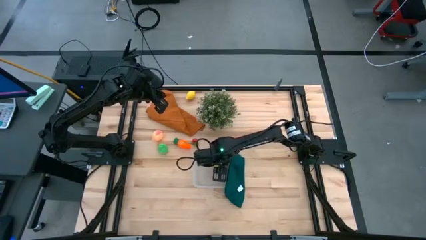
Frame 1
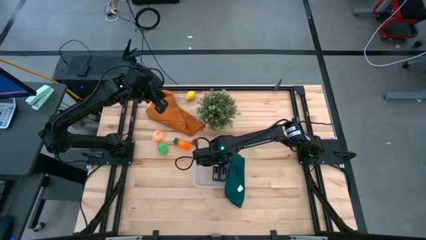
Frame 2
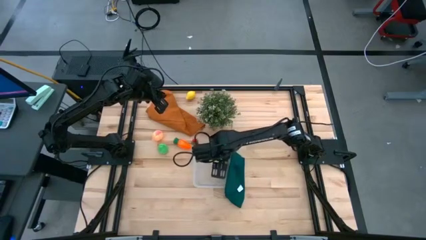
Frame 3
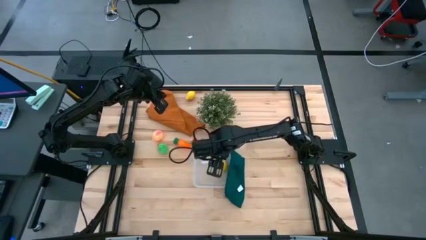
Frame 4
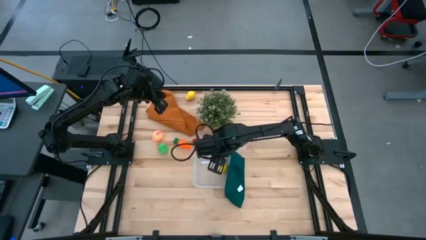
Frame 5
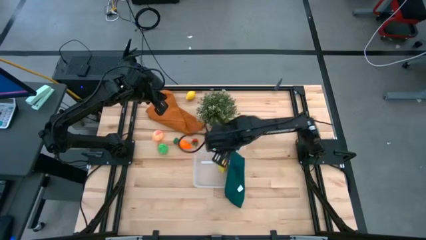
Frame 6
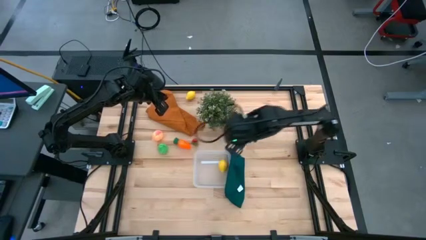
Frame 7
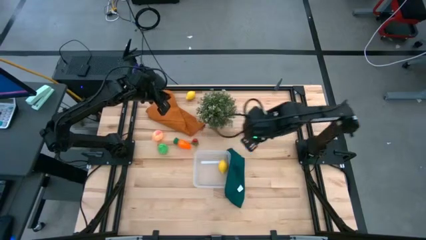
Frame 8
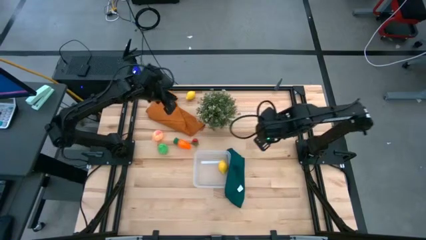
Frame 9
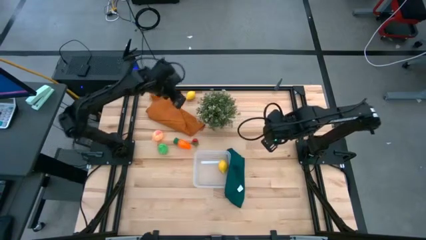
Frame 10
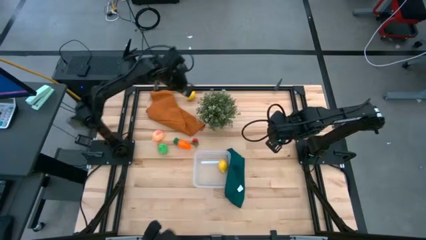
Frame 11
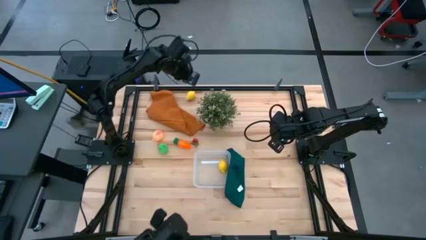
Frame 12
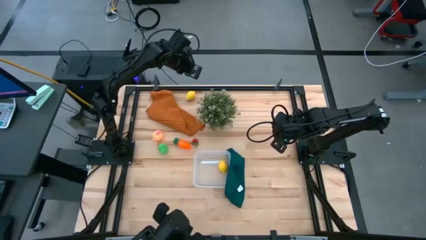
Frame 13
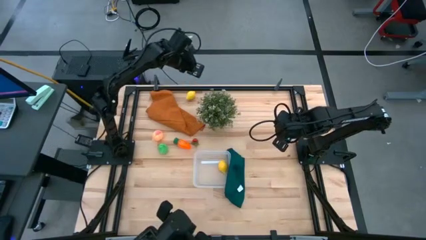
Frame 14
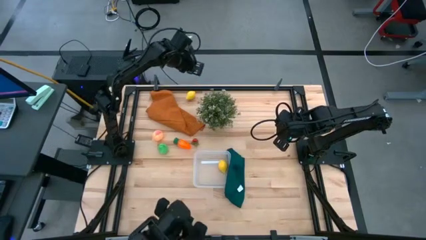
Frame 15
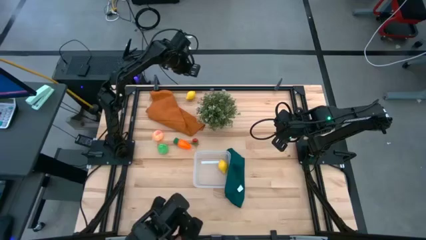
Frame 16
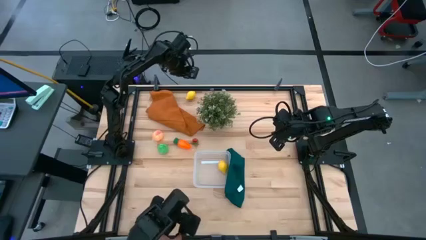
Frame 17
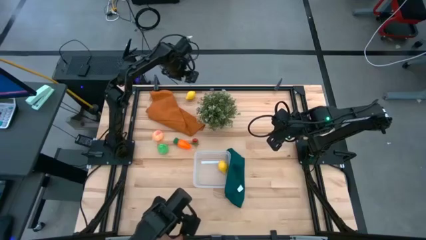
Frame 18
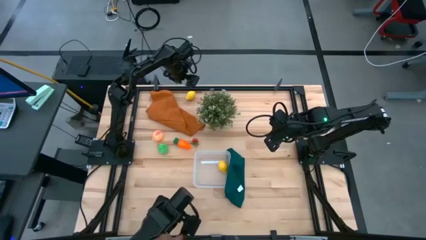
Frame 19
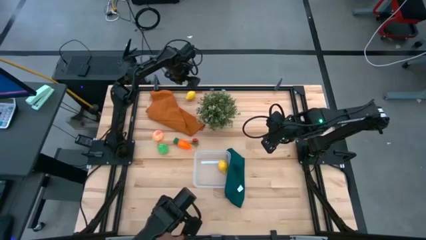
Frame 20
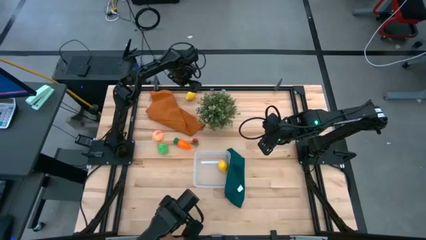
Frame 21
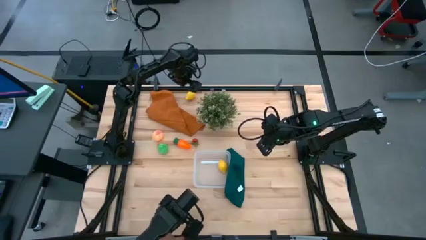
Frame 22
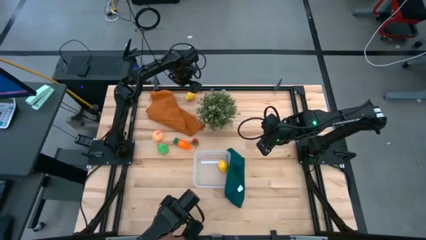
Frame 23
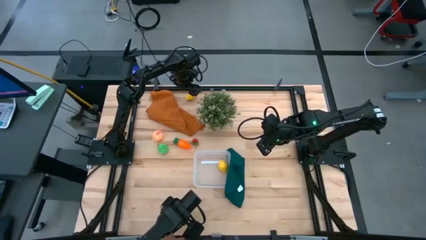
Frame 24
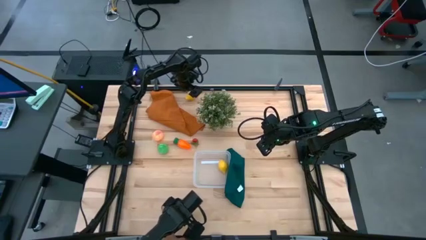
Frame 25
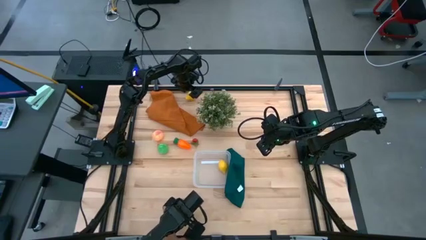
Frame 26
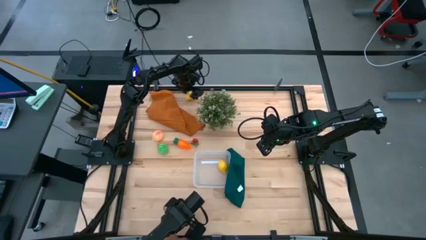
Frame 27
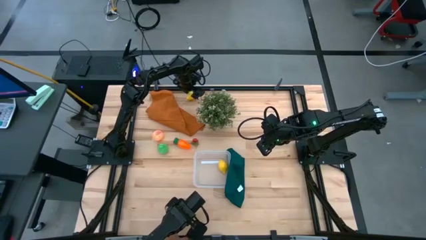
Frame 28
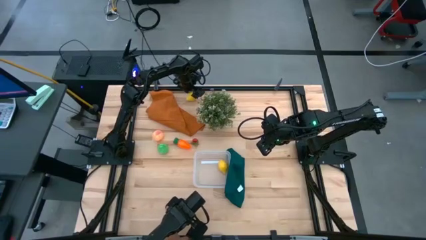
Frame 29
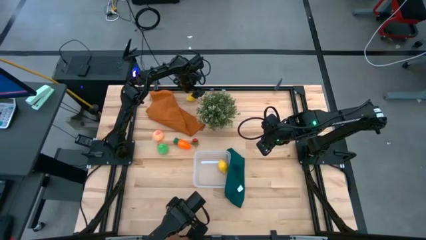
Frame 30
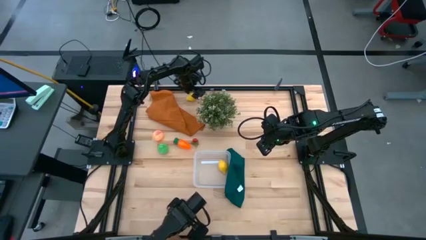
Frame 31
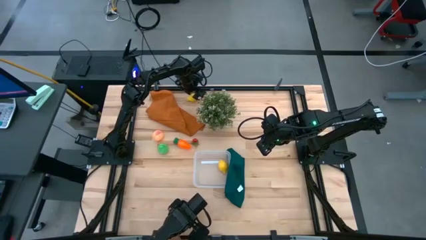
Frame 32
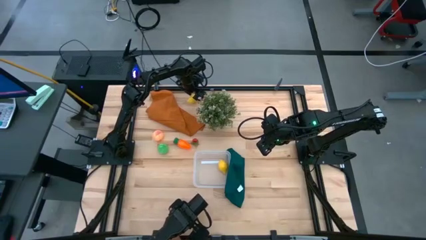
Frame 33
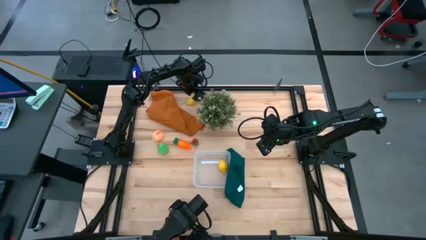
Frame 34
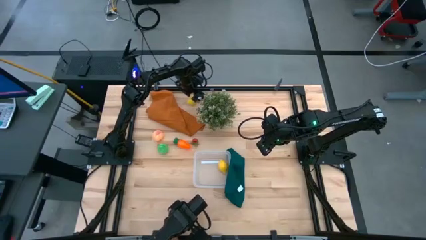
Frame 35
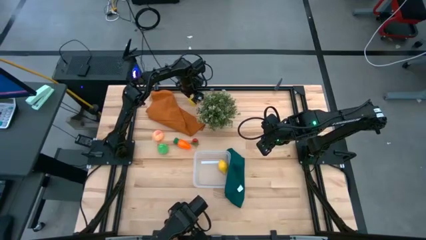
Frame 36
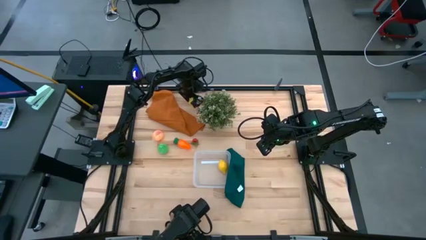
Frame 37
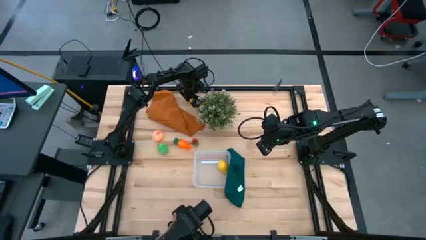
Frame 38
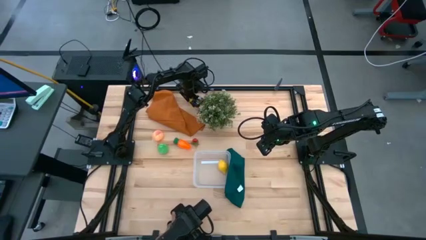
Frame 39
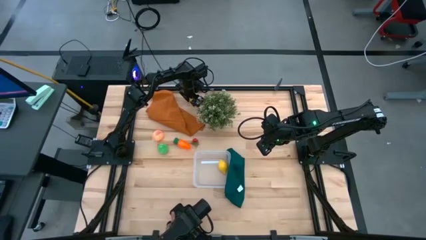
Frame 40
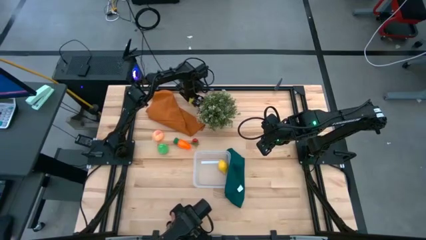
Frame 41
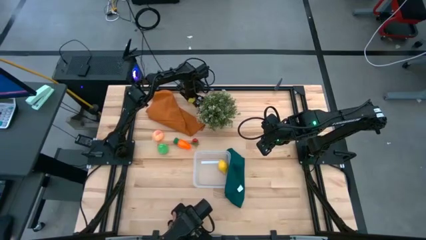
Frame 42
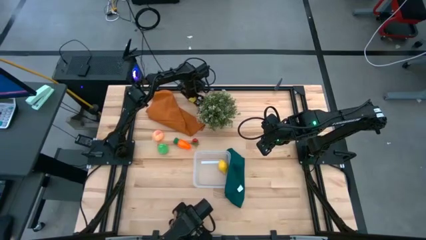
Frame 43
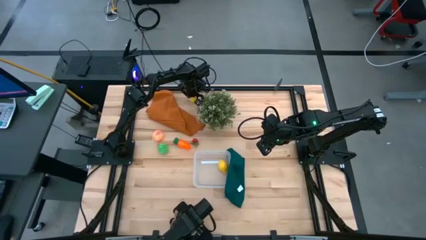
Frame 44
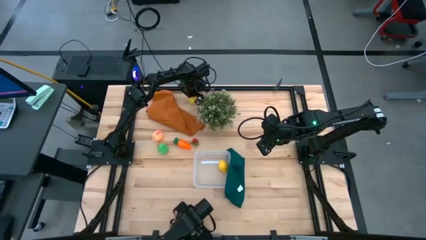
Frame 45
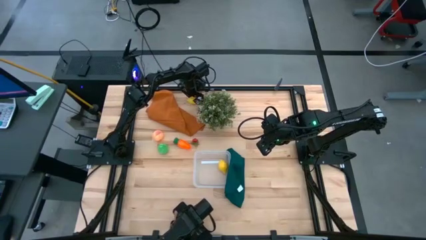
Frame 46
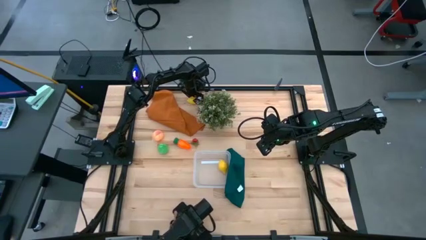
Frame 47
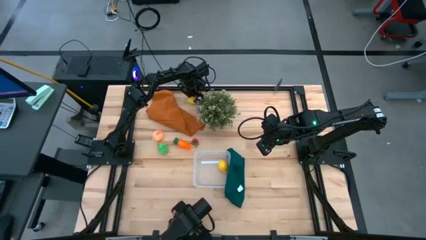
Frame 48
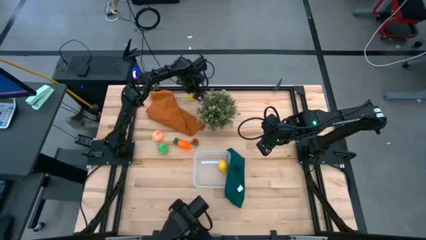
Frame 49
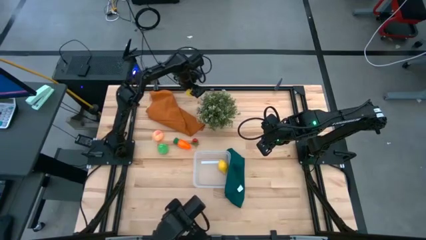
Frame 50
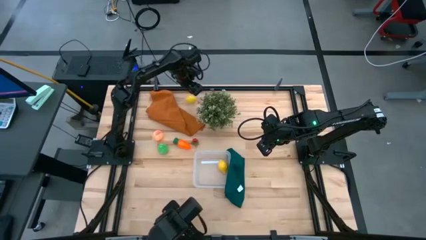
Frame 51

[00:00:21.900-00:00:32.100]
Task: Pick and placing Produce into tupperware
Put the yellow lemon into the transparent bin

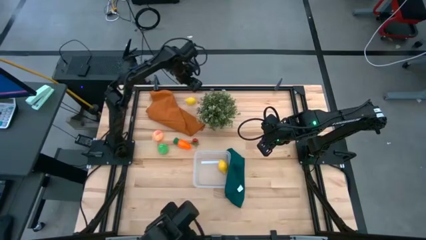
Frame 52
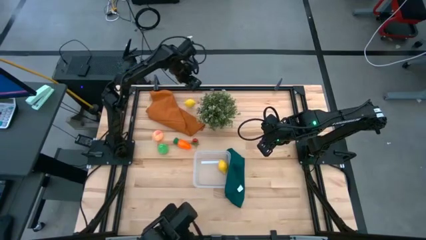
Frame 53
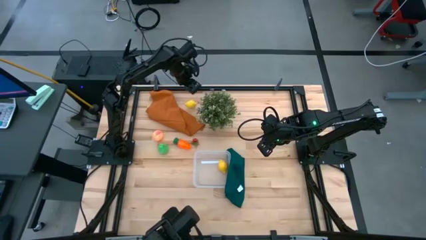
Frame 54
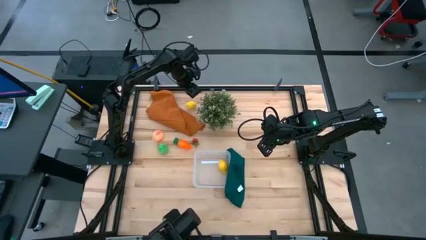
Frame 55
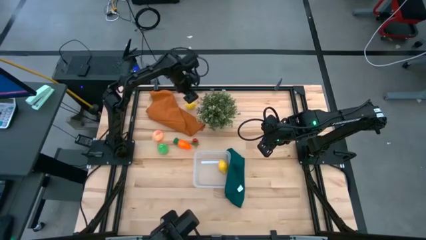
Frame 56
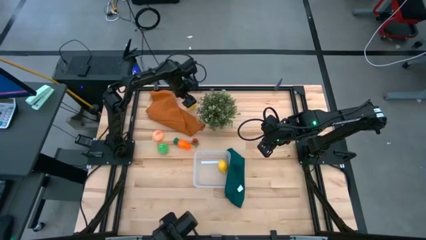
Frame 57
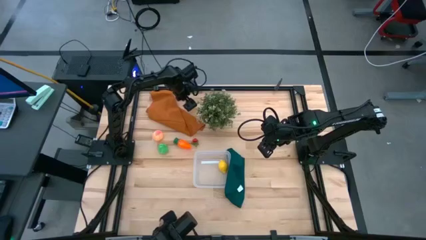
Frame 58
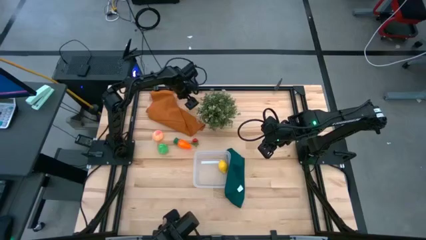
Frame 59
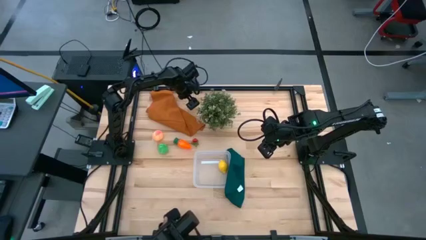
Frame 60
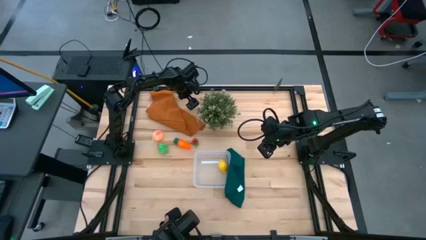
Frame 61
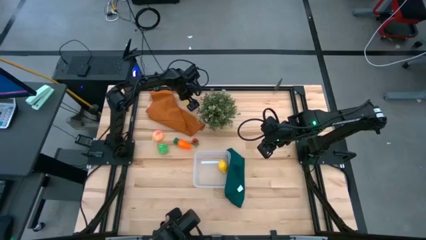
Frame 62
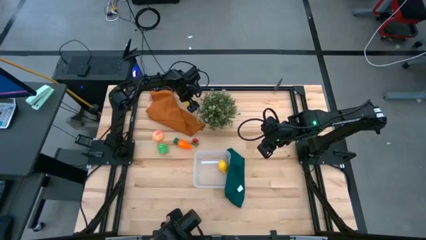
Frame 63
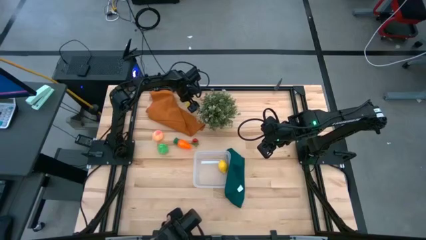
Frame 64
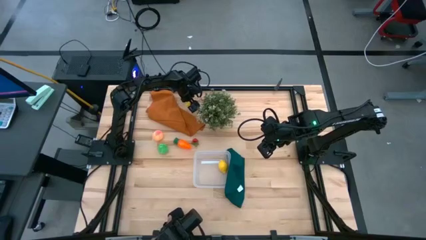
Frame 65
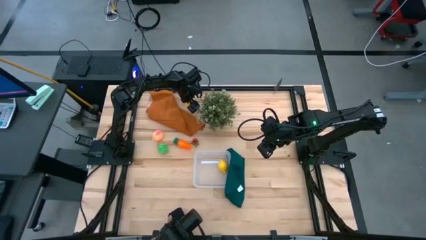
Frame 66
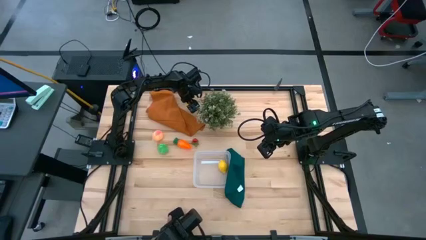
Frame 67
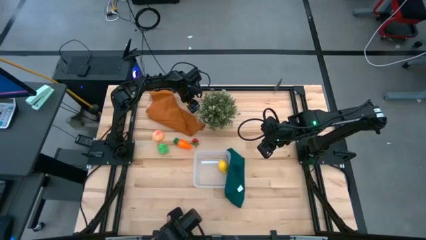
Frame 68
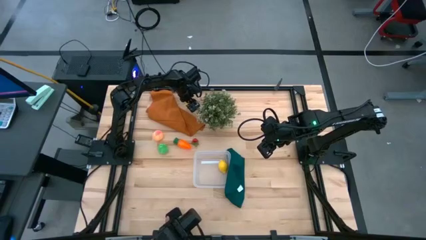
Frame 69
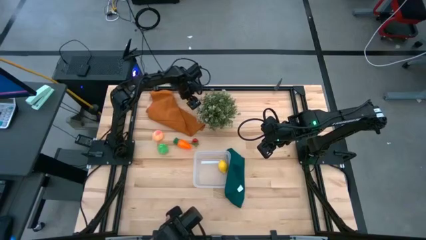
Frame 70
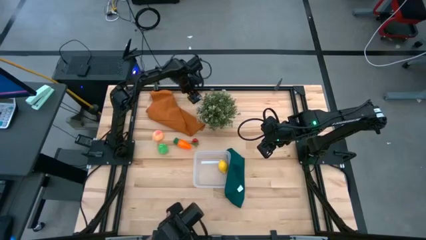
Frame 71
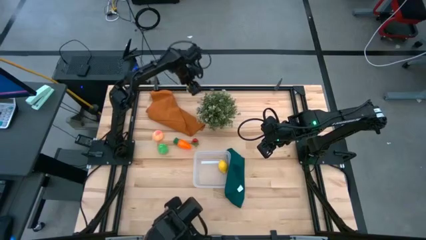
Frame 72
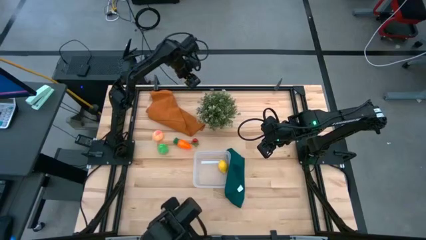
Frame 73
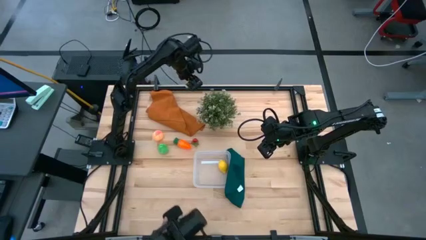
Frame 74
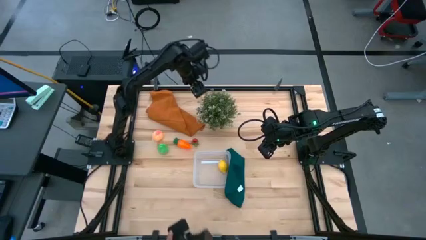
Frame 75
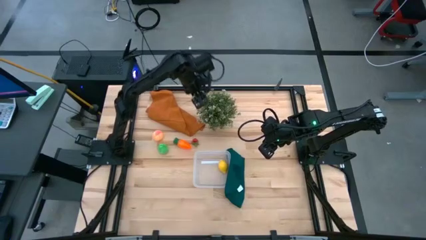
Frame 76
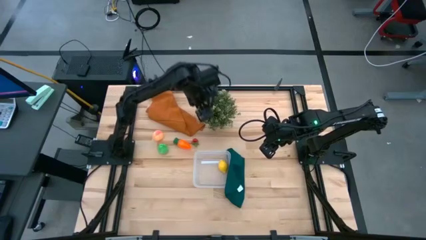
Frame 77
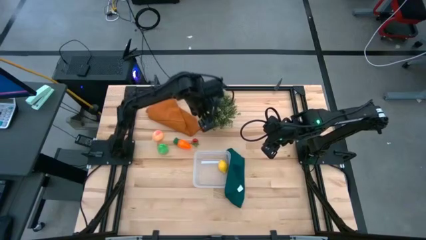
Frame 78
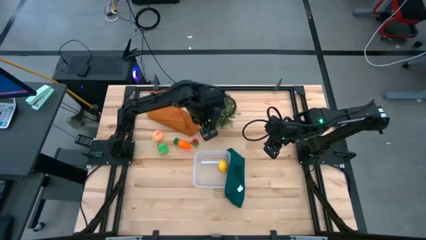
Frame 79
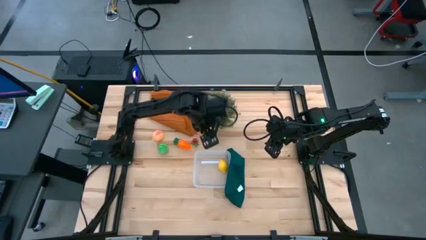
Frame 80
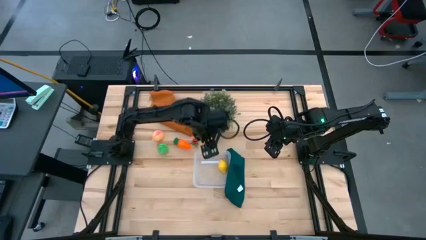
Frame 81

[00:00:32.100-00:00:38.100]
Put the yellow lemon into the transparent bin
